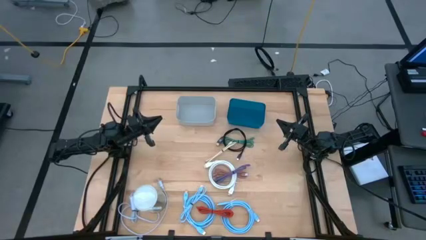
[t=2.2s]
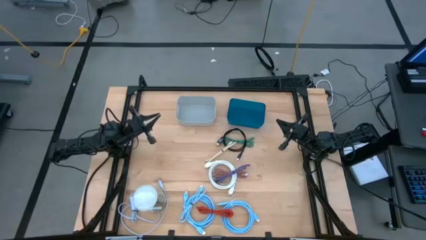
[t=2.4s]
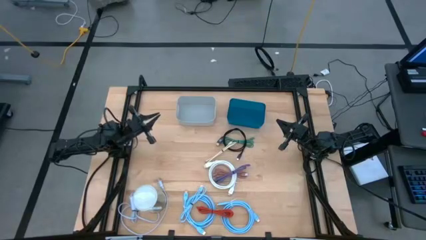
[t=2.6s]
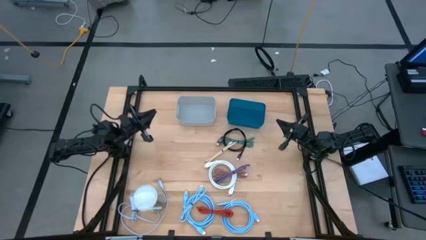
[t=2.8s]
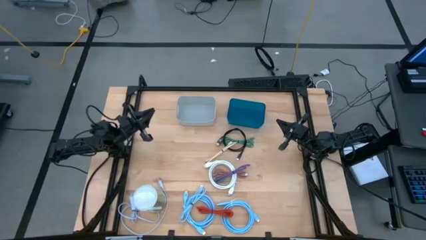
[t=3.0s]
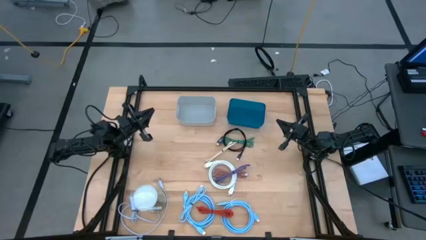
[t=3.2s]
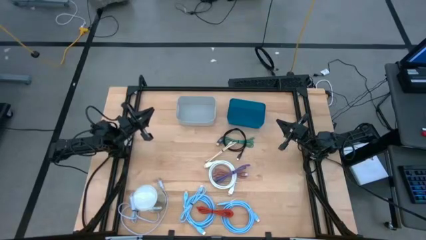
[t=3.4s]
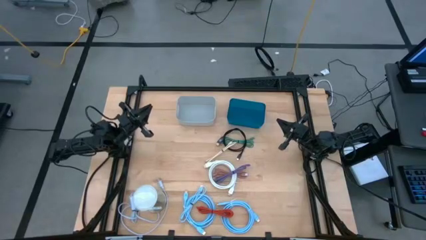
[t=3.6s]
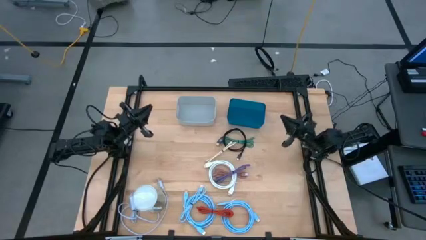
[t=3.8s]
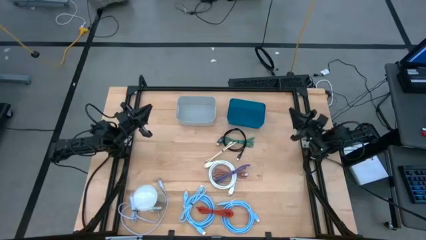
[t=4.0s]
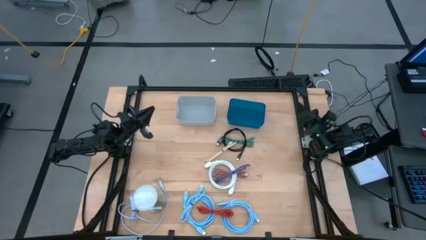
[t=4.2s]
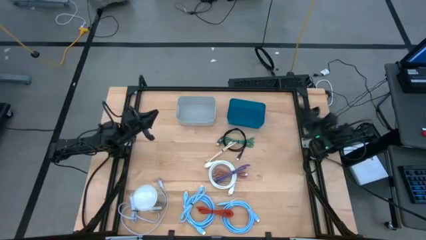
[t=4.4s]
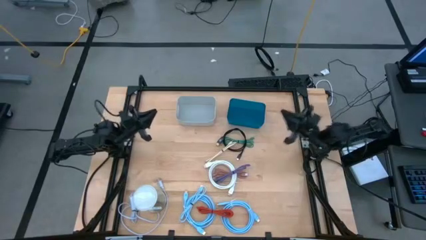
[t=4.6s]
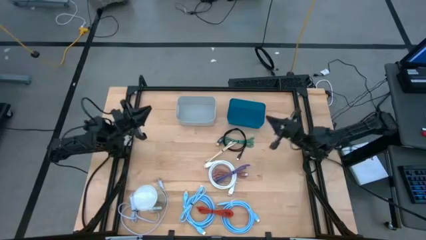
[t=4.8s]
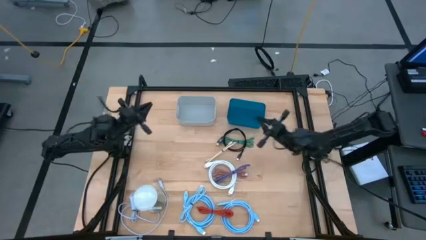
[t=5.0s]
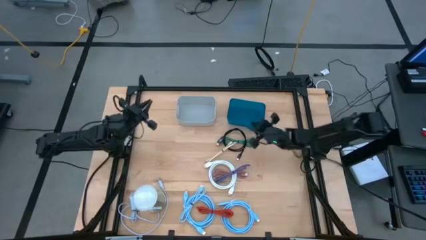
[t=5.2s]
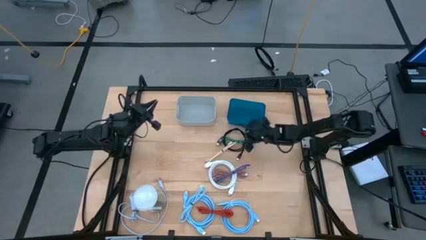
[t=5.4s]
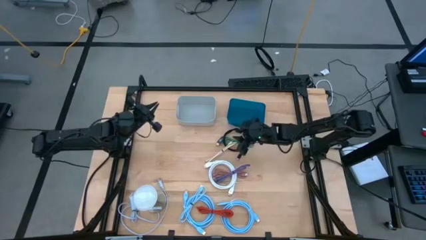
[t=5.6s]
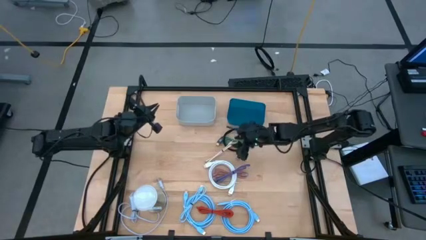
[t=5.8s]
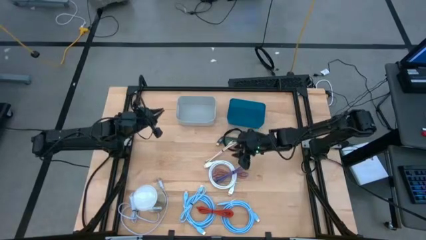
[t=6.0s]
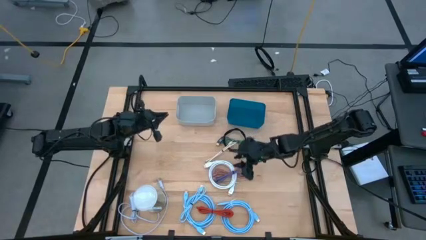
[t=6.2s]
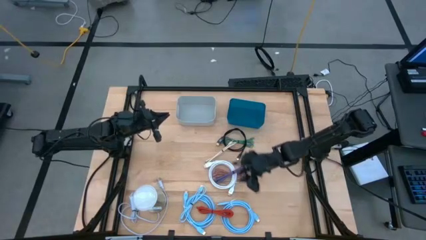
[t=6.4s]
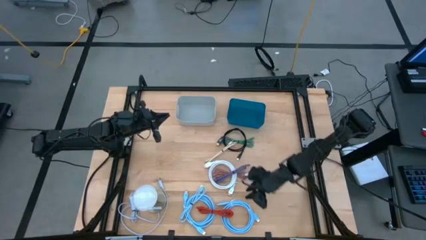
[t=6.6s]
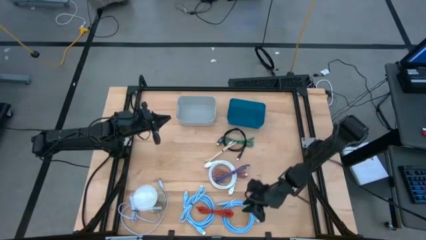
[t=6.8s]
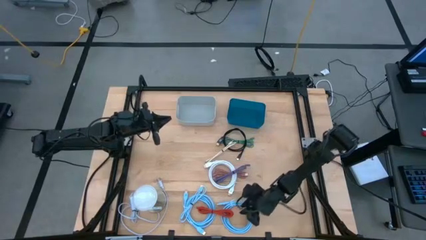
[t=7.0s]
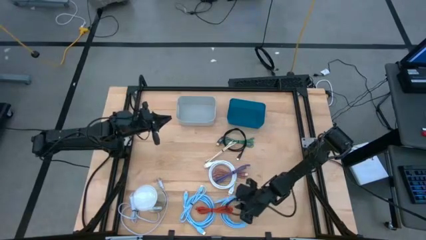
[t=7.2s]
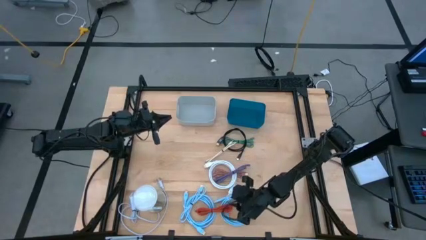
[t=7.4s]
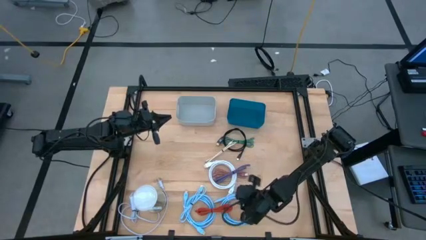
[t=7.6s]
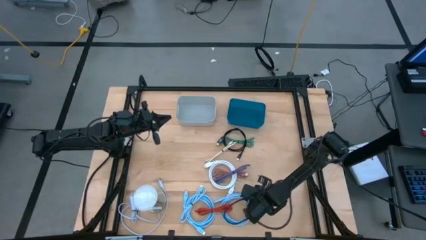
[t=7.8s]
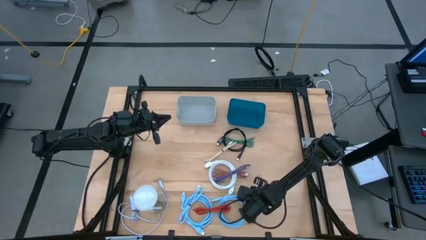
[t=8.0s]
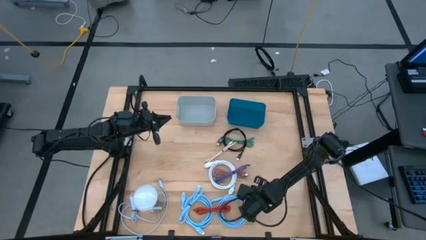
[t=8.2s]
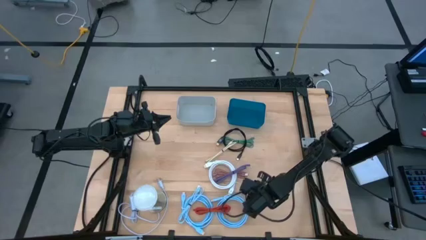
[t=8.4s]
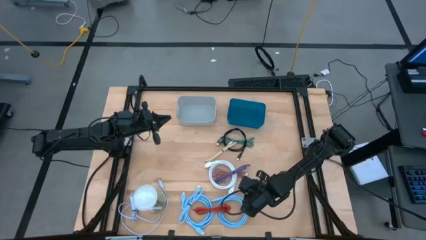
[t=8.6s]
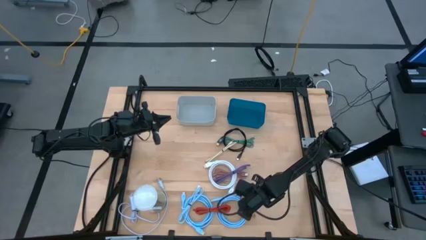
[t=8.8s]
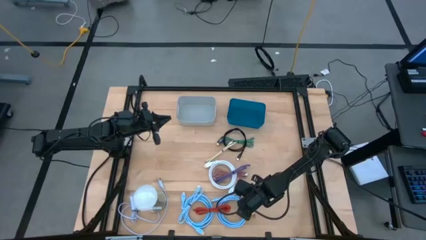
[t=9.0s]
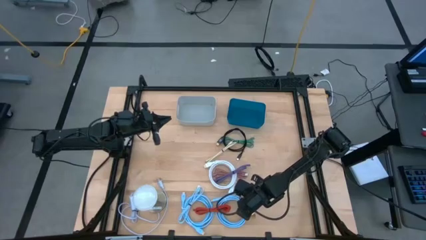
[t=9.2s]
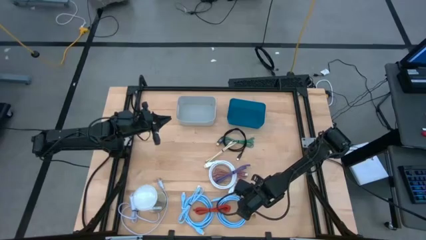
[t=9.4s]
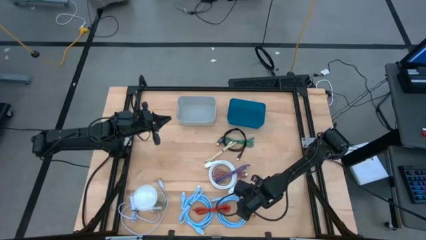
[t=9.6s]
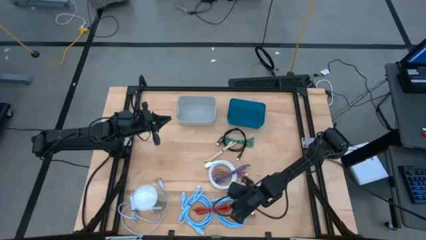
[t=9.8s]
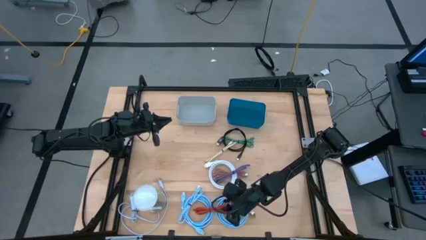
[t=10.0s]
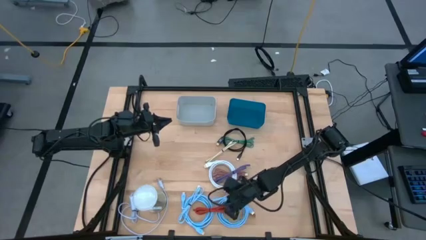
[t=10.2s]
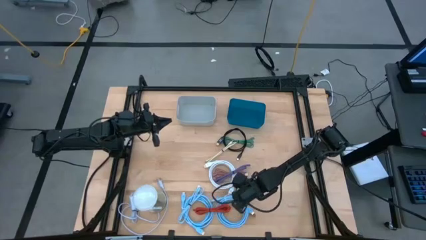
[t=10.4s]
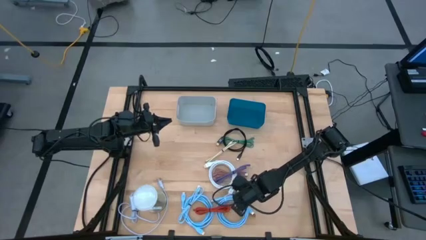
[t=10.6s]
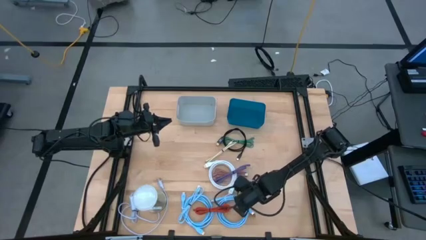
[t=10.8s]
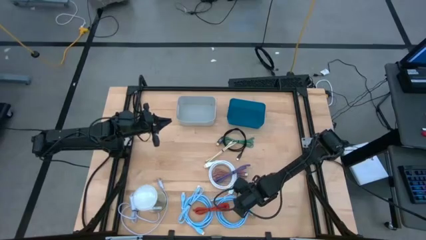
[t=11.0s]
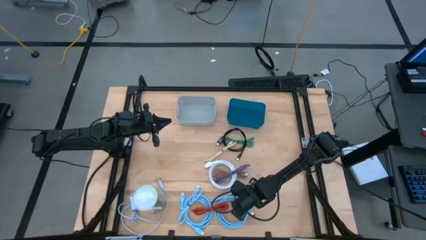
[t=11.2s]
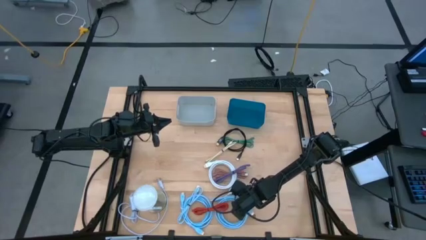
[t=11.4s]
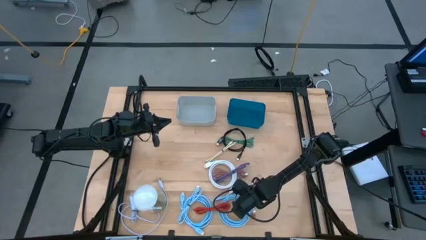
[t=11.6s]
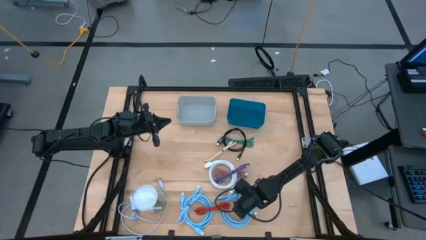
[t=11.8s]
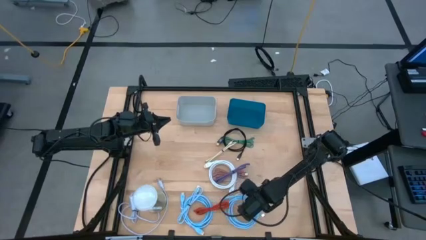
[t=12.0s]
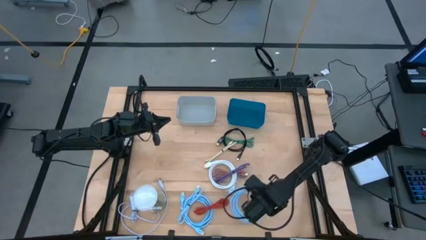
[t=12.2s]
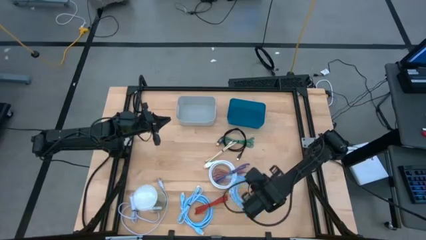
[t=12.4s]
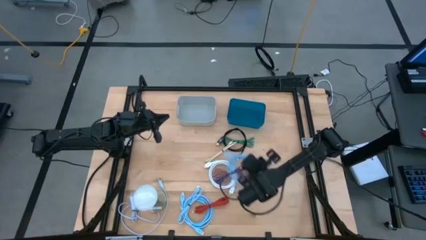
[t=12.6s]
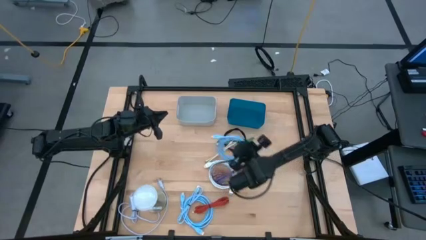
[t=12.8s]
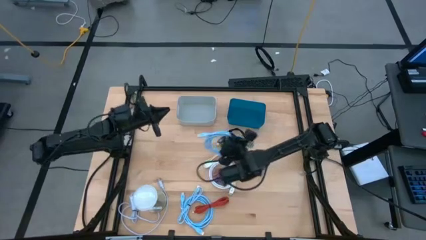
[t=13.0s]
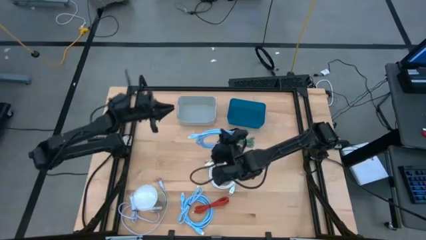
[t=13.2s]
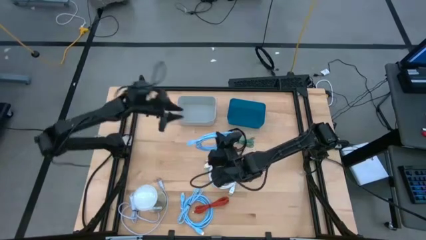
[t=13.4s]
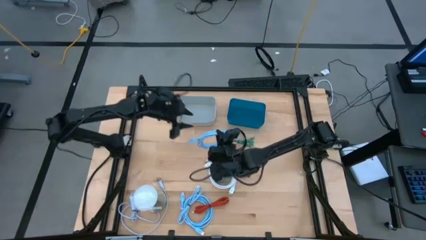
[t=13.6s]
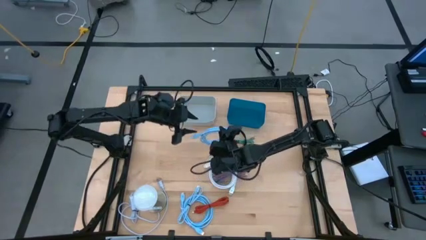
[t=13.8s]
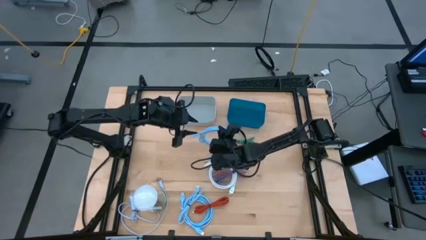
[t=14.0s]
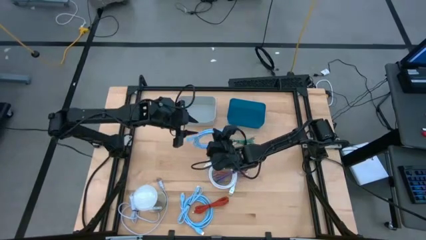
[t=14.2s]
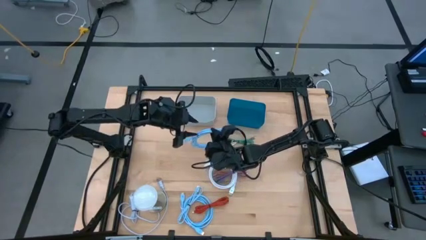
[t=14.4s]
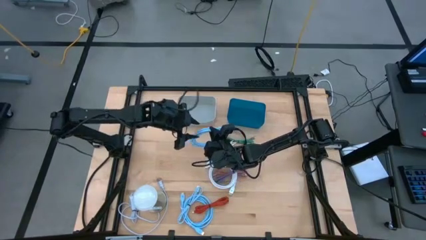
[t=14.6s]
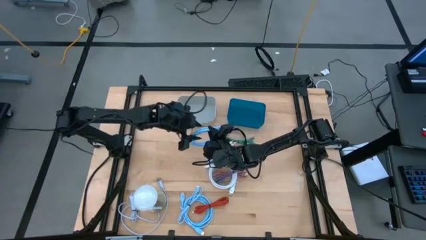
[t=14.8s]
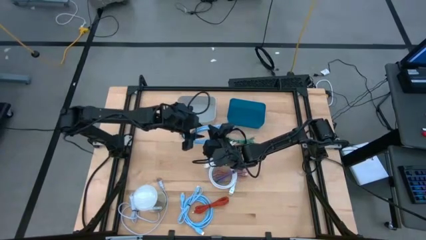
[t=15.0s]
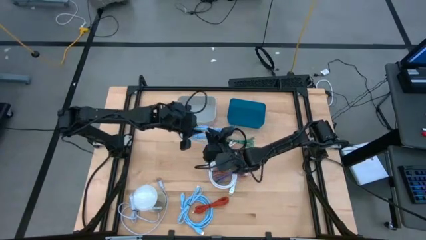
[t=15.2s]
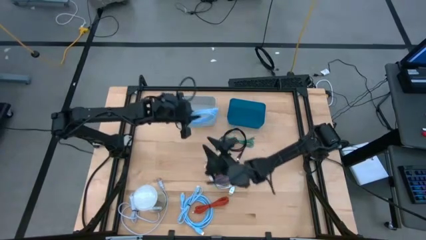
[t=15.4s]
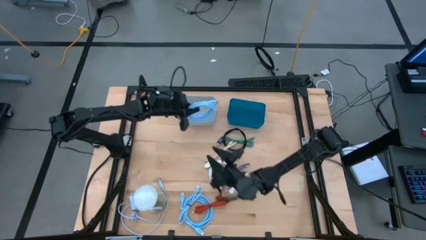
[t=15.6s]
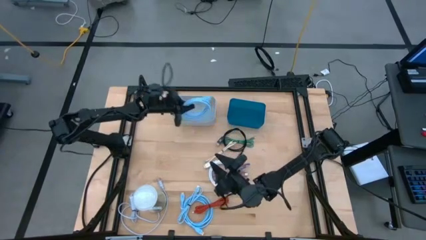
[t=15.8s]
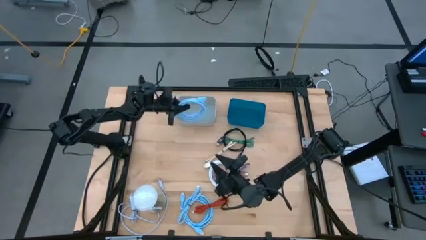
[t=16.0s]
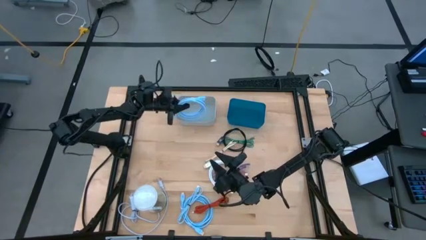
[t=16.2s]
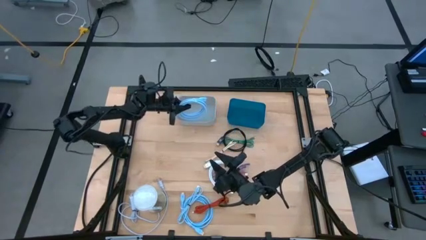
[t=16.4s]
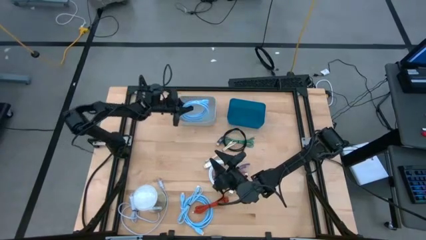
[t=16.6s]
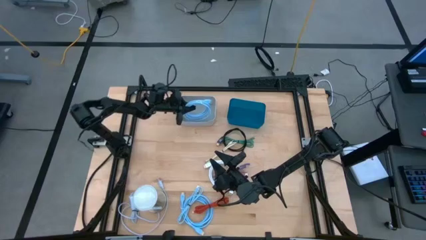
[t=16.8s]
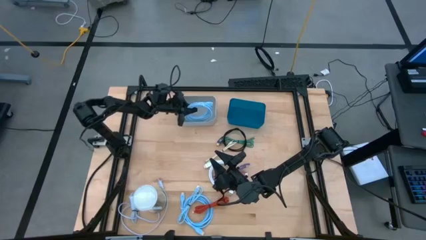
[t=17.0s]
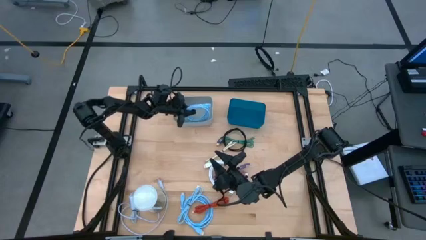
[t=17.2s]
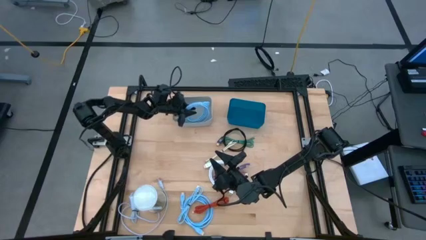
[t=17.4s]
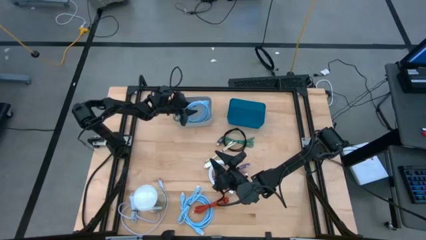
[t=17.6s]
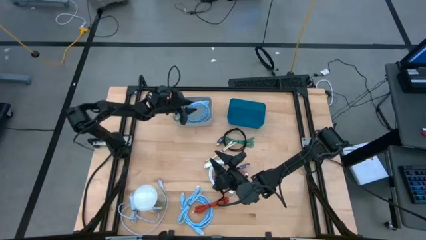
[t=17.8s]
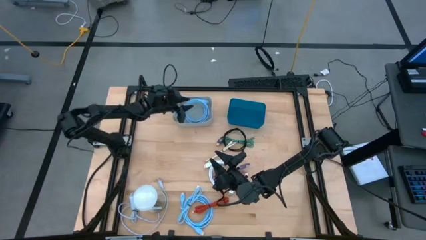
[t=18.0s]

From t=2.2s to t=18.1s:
Task: Pick & Place USB Port
Put the right blue hdmi cable into the gray bin
